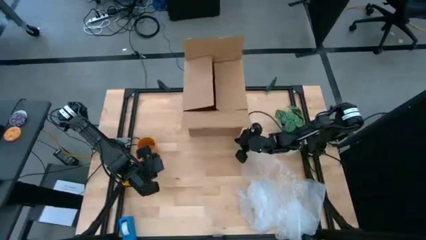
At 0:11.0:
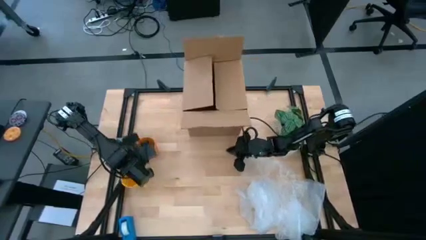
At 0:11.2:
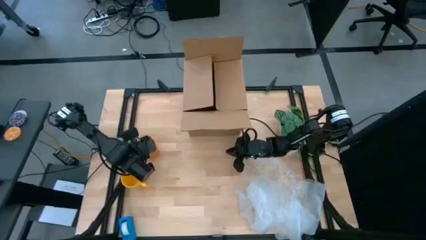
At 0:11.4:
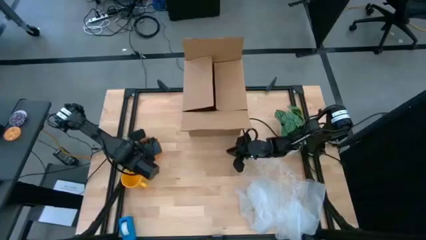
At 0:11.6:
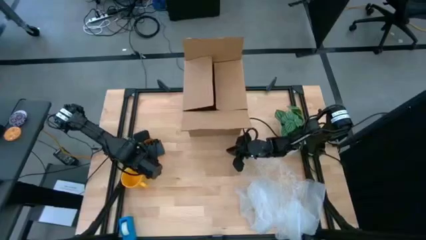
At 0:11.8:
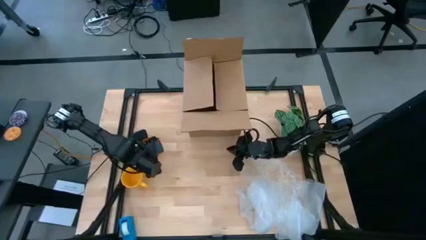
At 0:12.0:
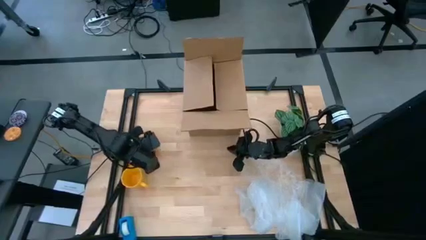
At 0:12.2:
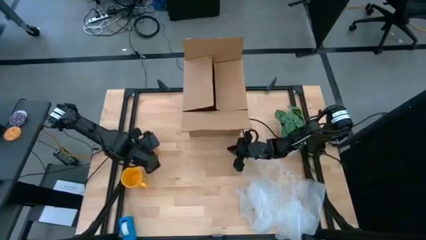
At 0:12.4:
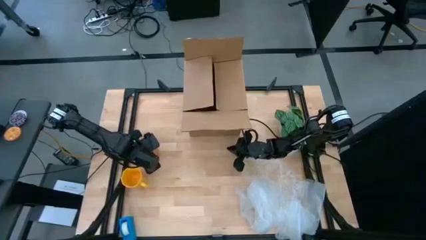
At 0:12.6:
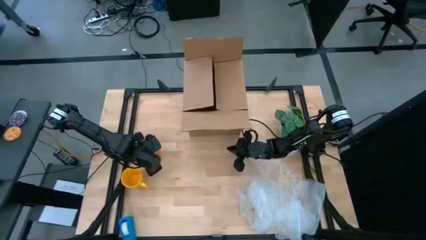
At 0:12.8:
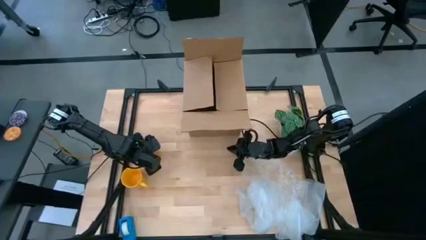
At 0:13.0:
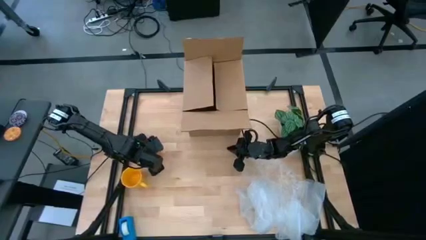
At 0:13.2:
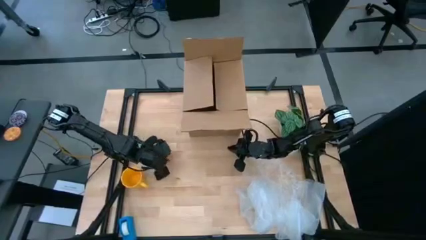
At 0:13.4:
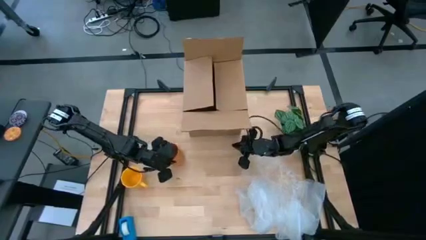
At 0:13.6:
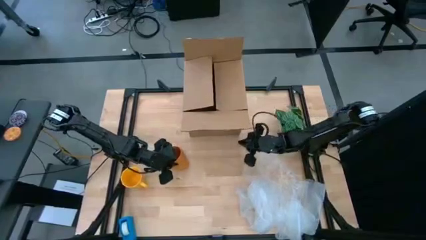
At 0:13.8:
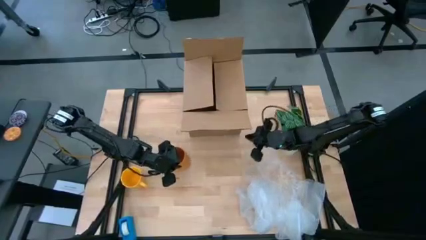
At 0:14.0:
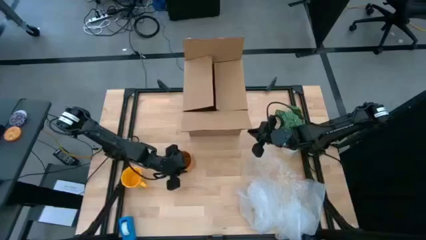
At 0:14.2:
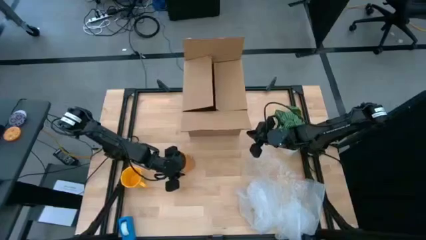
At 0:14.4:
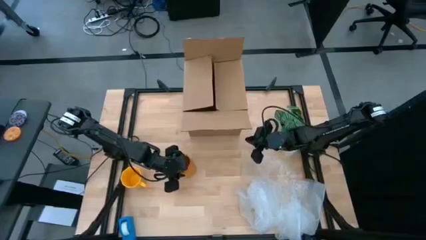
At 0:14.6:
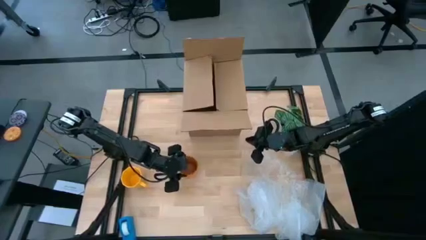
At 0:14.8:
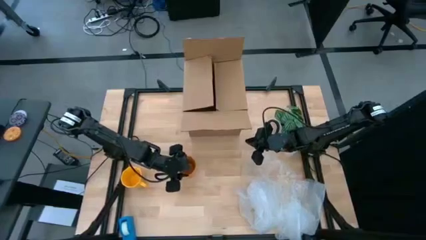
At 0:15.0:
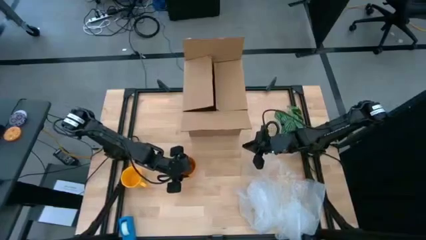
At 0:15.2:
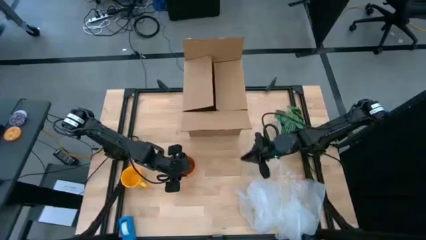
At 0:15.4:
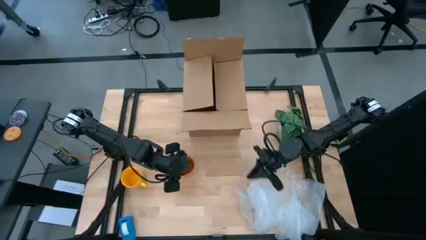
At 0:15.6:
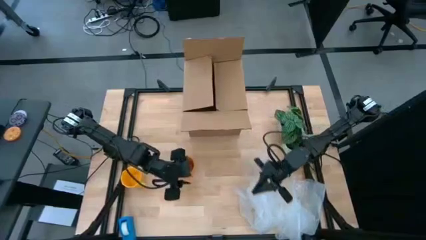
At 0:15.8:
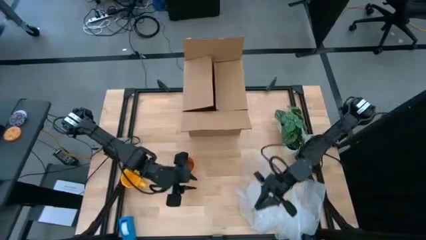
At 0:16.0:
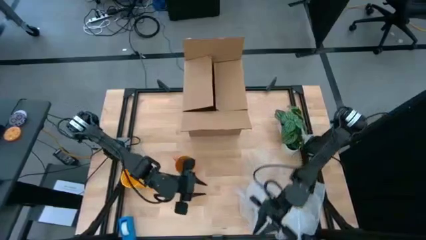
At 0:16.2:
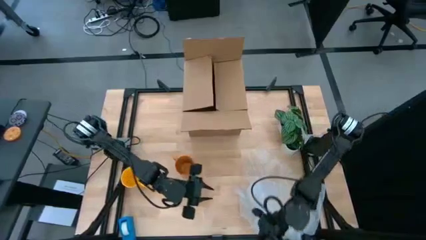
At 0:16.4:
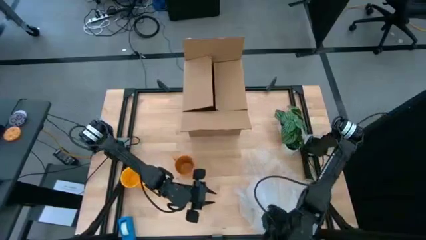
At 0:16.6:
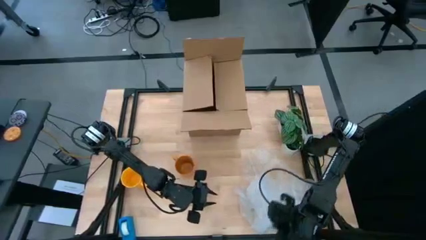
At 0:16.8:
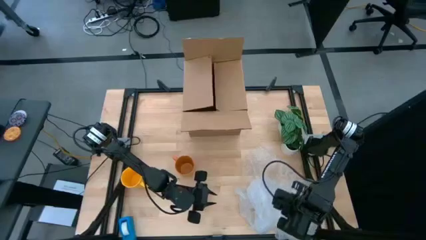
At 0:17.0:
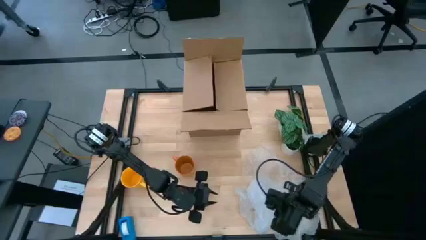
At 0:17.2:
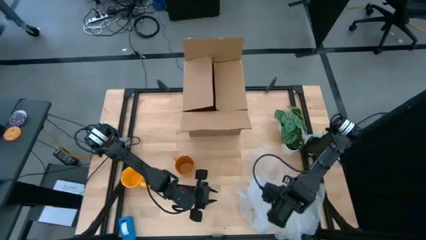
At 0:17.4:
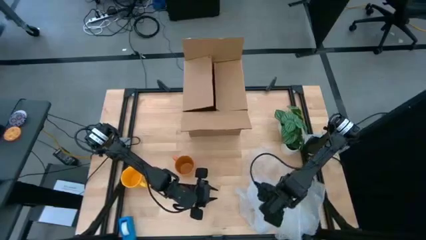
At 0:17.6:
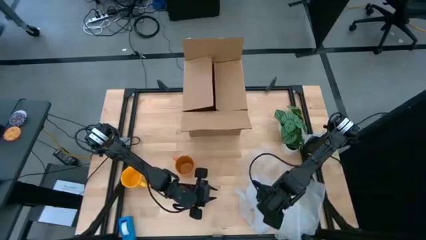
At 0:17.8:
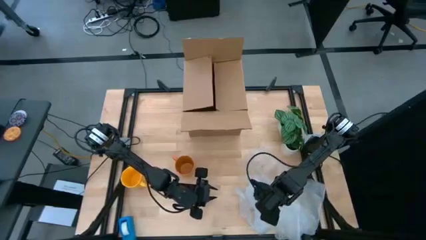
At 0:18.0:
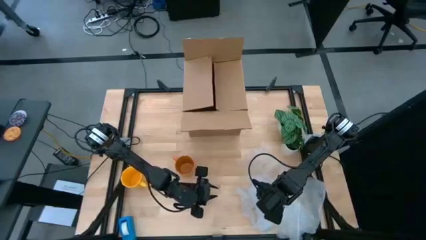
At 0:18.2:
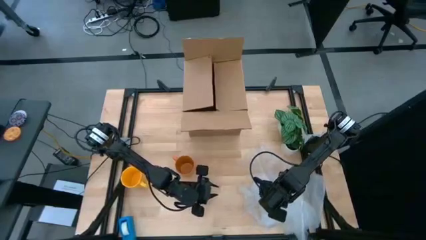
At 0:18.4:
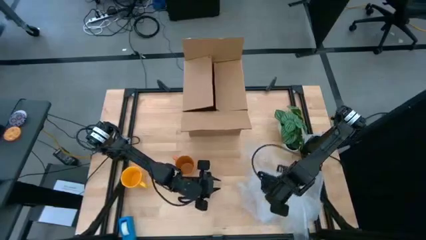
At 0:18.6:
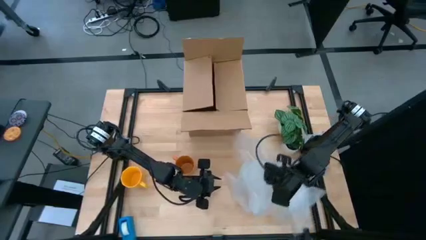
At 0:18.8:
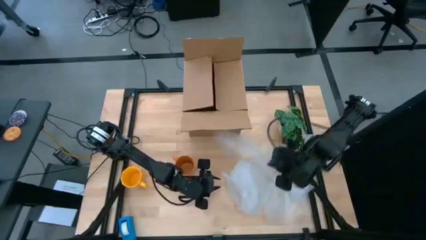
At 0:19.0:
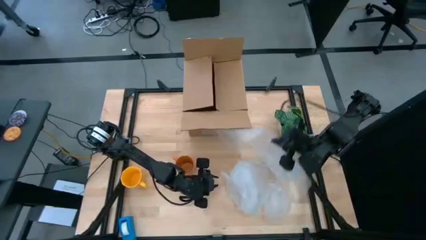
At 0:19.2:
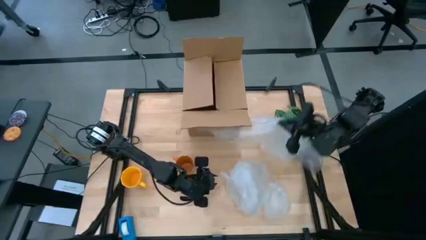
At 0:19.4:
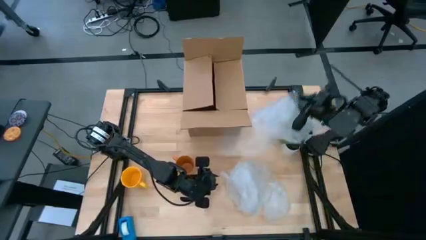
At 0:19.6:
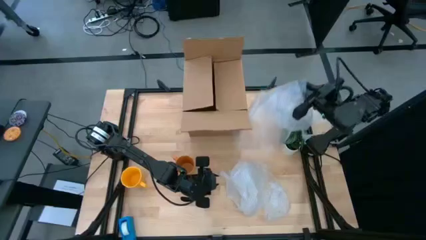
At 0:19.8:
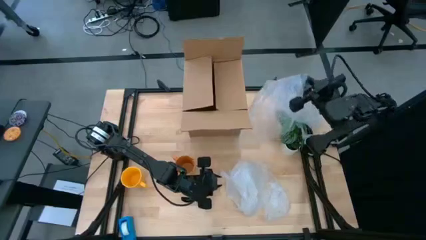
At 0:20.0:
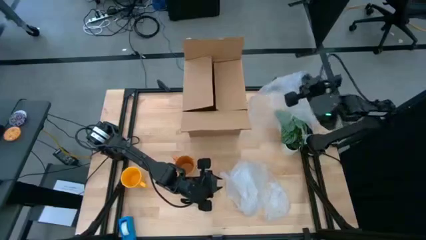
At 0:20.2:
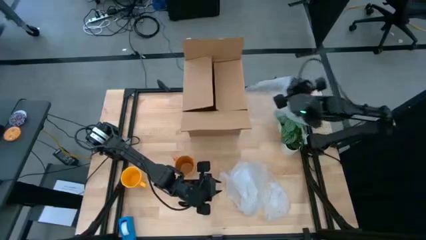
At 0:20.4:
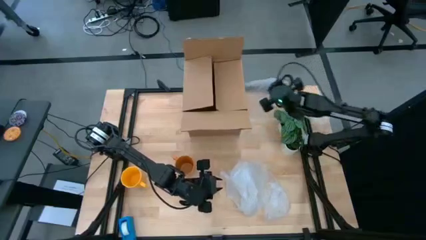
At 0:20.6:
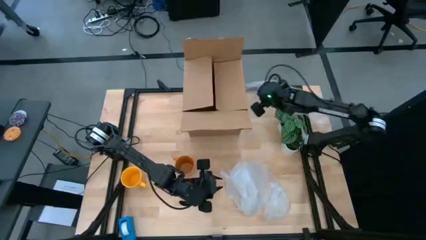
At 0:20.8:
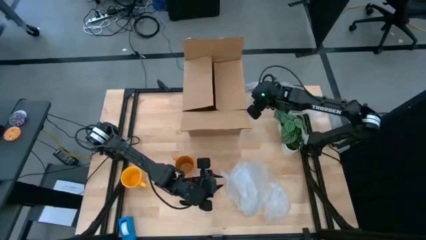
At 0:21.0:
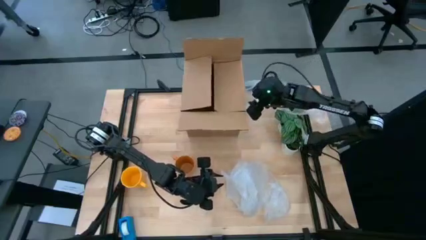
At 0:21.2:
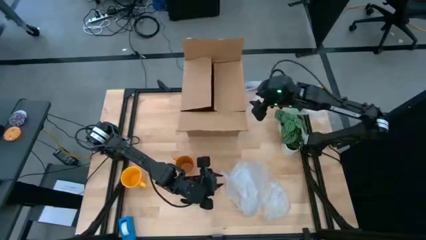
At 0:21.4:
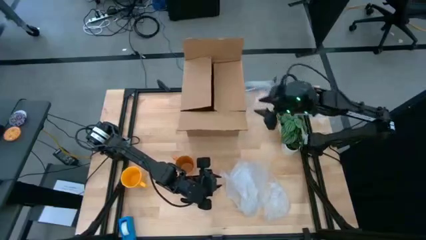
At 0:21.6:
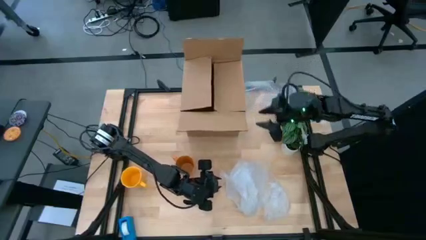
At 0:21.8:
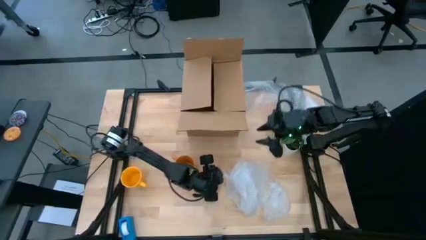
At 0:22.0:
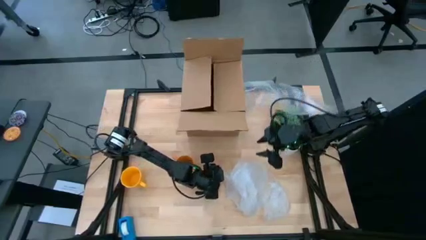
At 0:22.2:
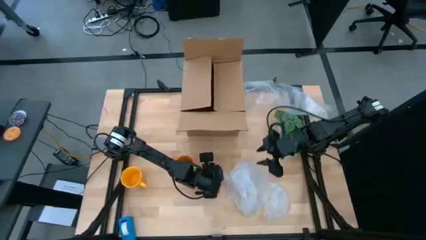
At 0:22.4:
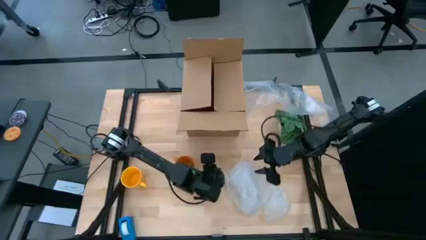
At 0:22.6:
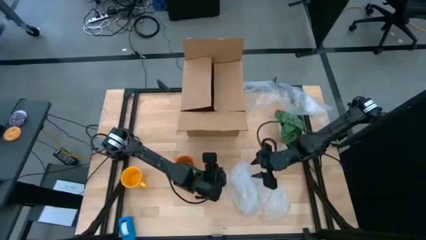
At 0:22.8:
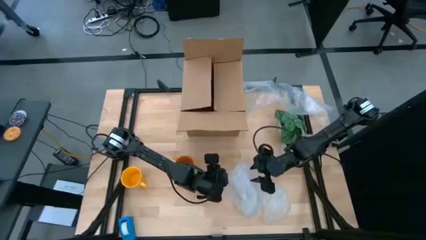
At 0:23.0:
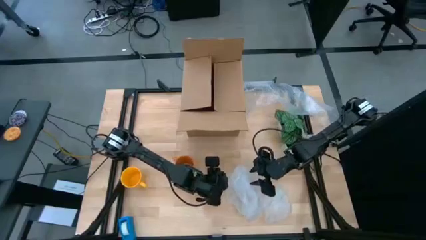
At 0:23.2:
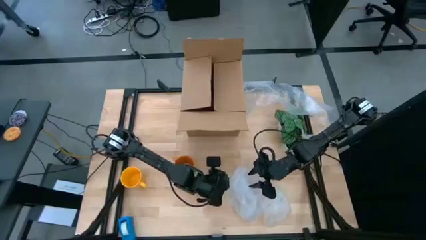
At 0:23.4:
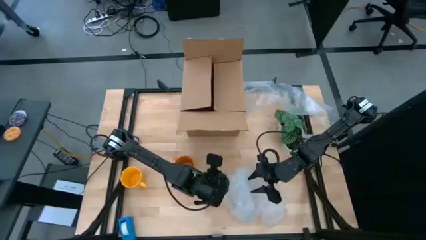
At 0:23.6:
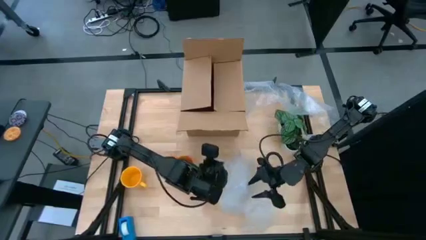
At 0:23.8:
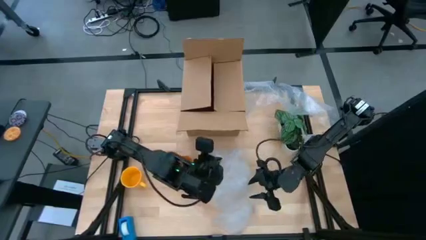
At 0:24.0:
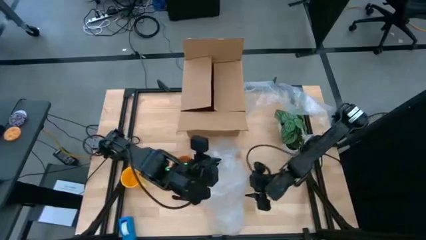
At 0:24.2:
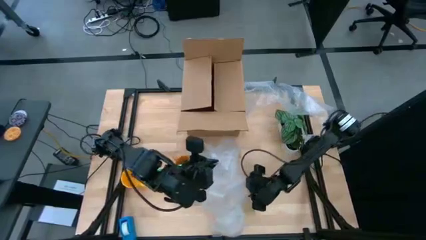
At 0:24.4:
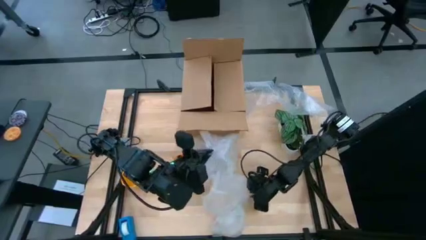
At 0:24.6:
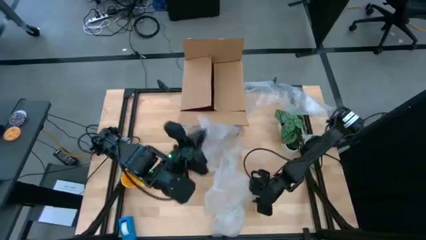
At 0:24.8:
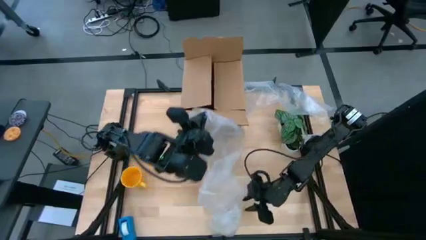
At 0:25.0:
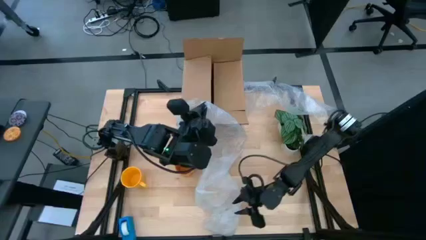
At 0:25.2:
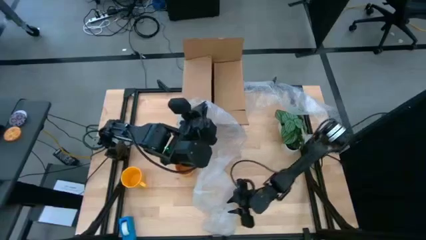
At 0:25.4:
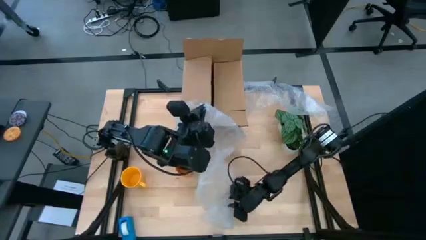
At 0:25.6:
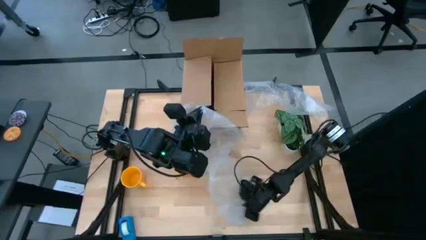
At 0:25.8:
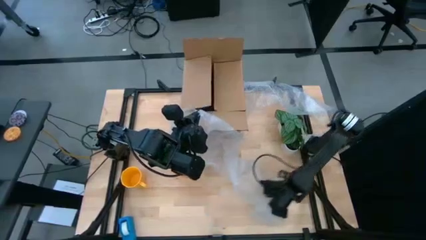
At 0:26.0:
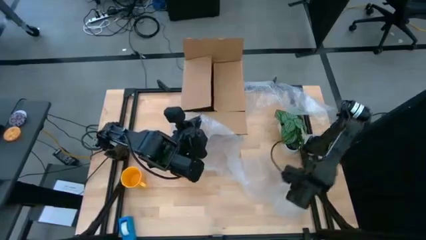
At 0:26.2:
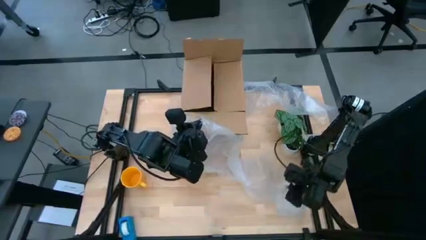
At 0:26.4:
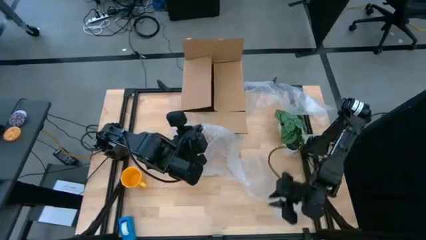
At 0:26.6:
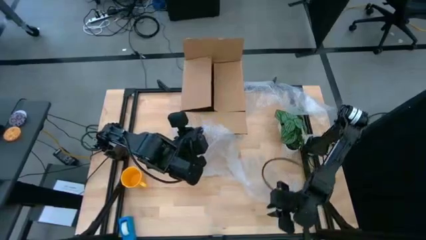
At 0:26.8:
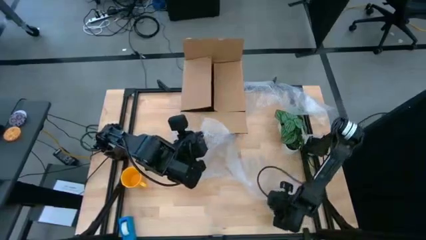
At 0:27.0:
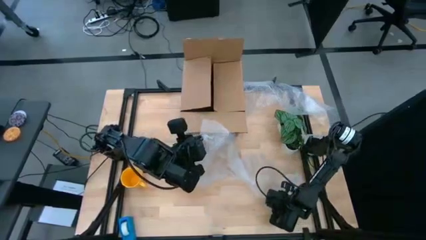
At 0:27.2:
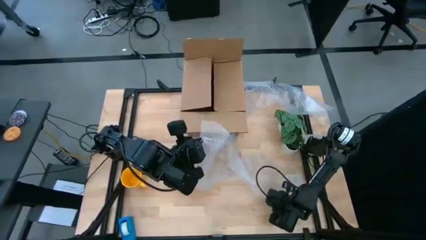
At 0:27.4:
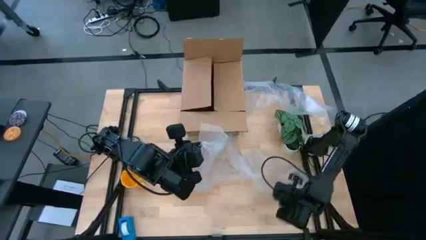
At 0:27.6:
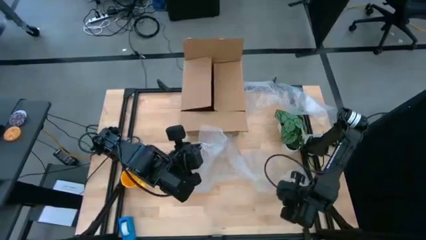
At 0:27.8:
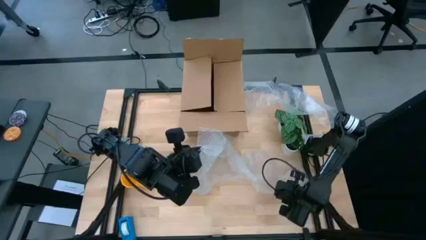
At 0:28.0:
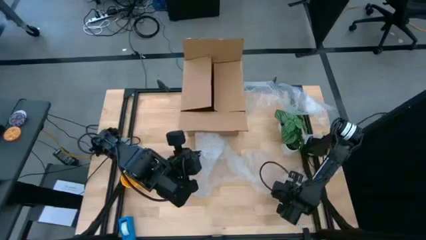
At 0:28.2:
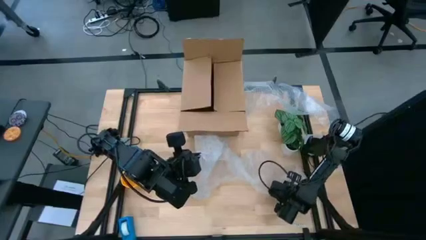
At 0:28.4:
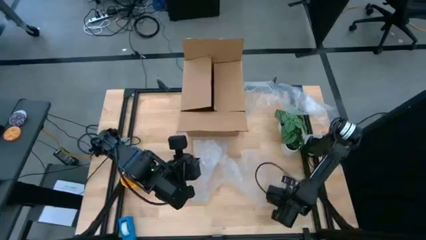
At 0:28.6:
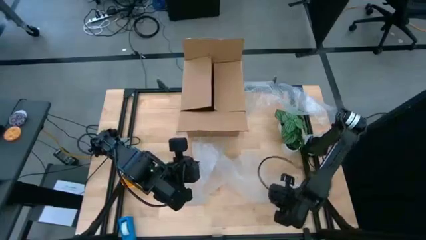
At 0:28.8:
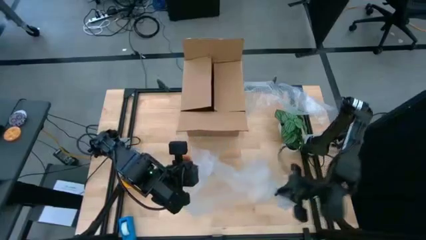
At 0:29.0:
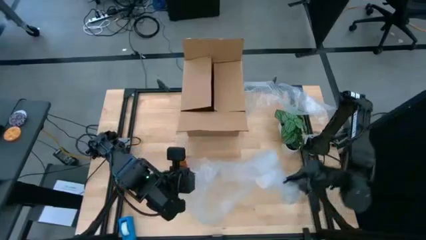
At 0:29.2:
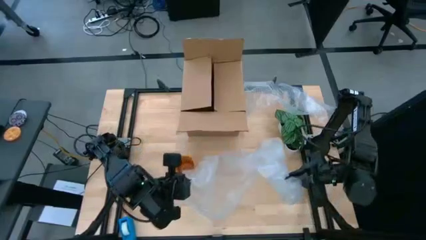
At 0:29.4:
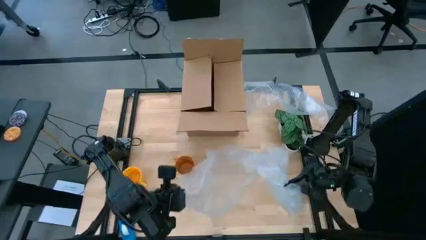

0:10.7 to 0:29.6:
Task: wrap mug
Wrap the orange cup with the bubble wrap
